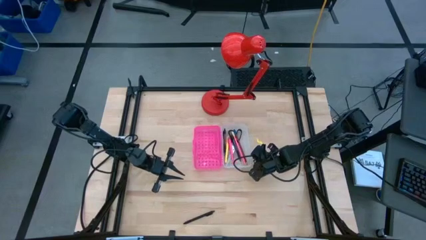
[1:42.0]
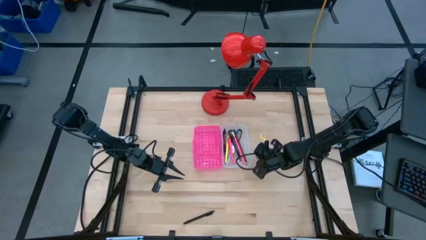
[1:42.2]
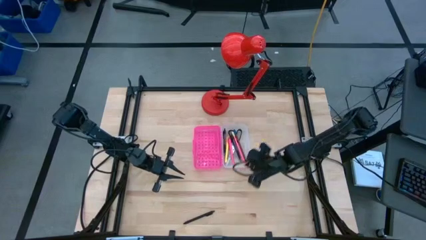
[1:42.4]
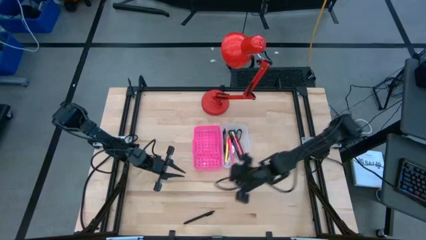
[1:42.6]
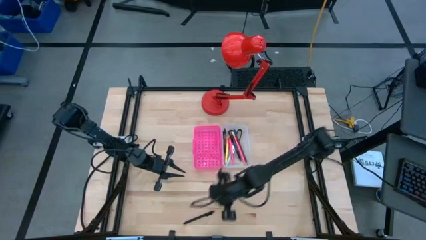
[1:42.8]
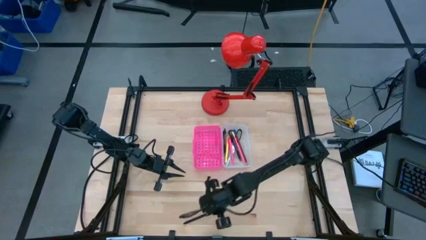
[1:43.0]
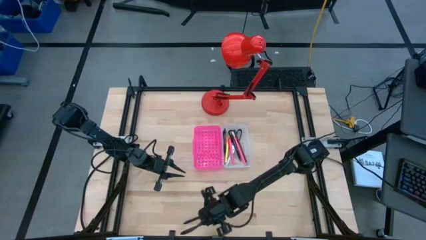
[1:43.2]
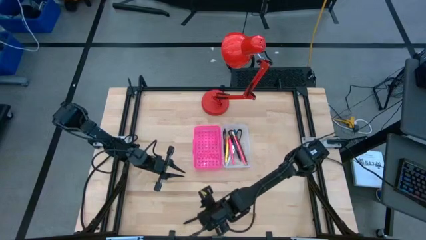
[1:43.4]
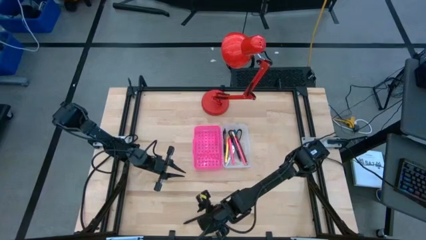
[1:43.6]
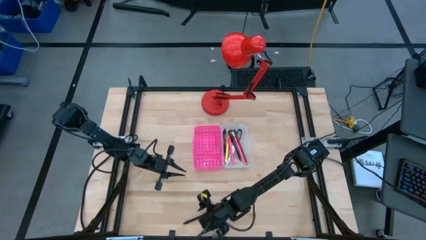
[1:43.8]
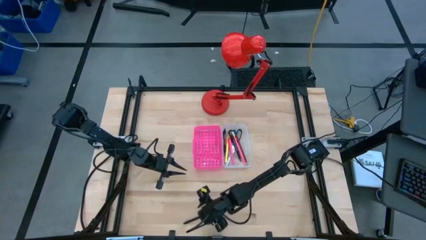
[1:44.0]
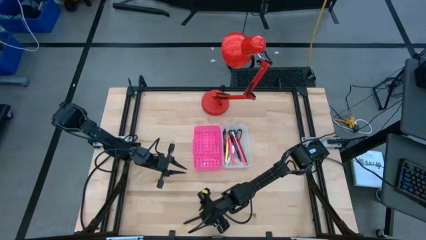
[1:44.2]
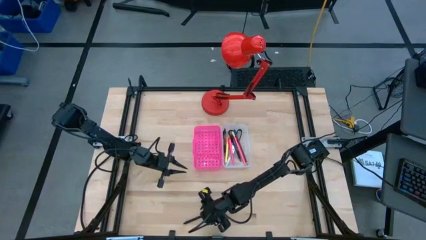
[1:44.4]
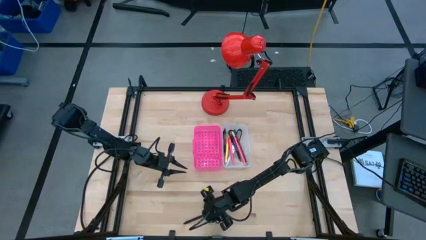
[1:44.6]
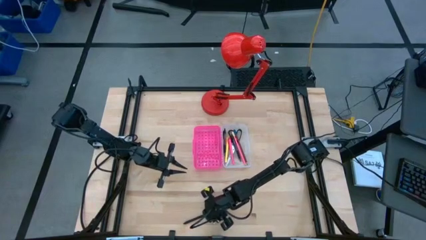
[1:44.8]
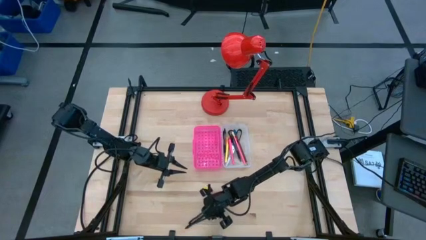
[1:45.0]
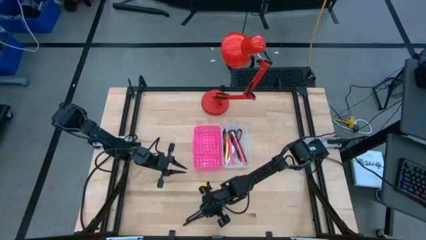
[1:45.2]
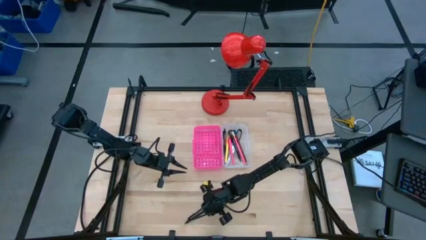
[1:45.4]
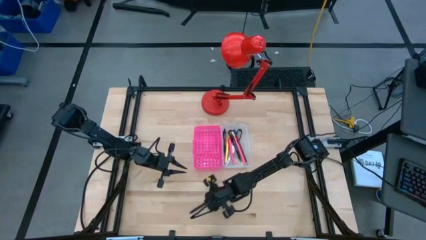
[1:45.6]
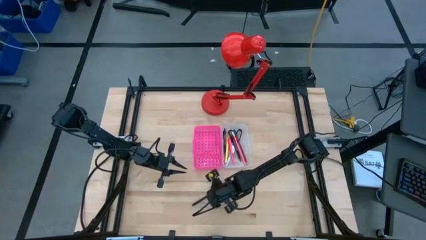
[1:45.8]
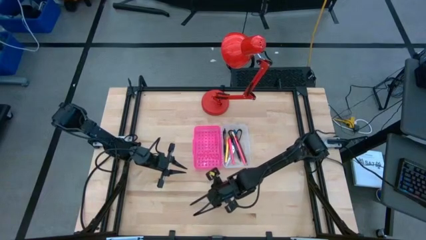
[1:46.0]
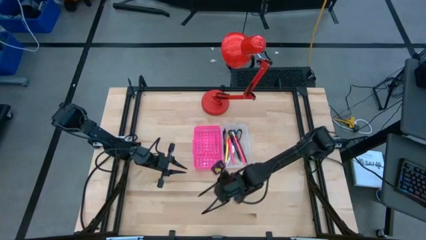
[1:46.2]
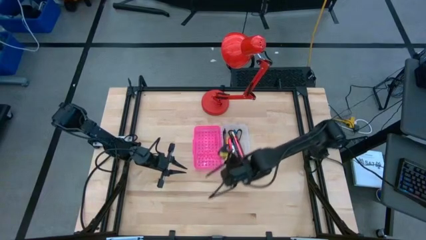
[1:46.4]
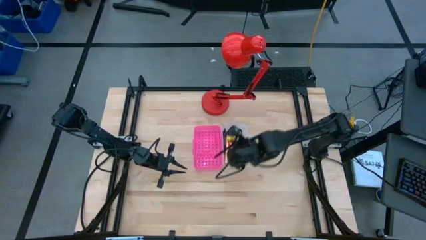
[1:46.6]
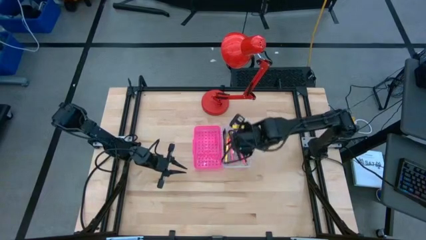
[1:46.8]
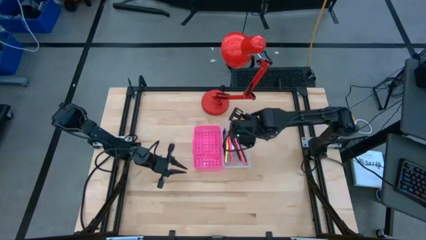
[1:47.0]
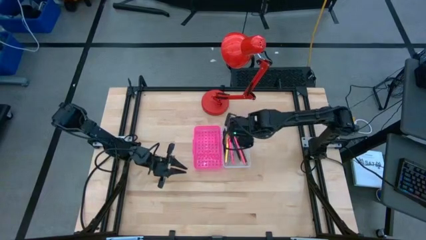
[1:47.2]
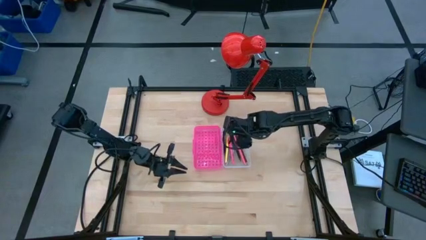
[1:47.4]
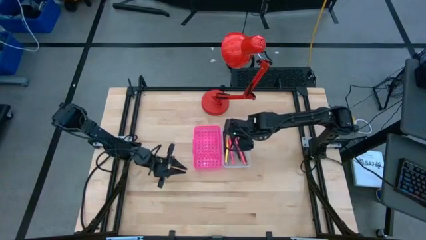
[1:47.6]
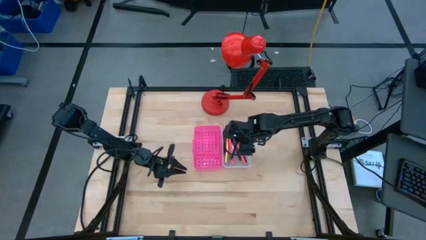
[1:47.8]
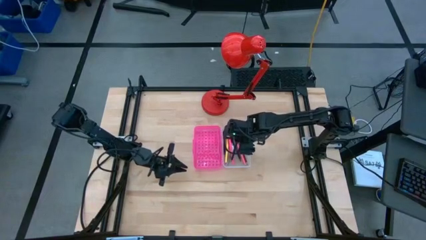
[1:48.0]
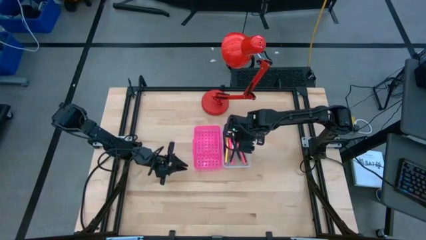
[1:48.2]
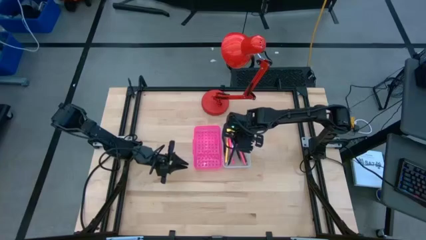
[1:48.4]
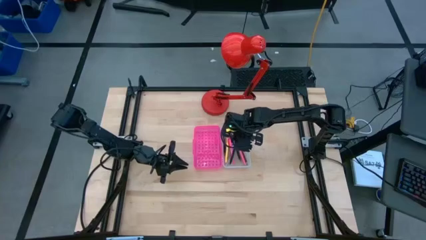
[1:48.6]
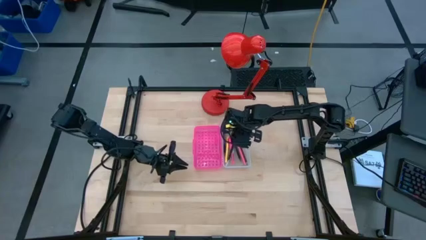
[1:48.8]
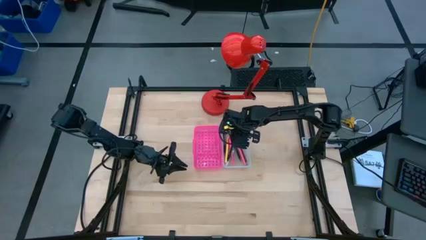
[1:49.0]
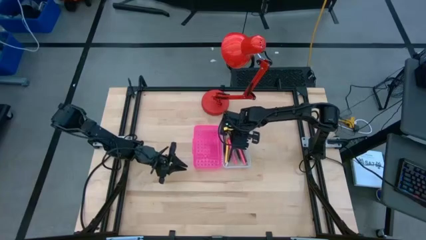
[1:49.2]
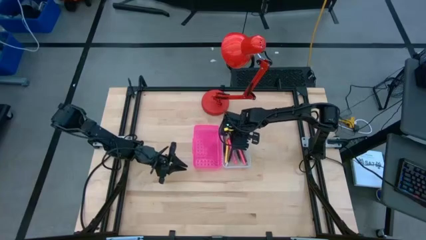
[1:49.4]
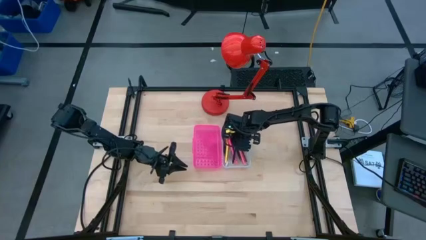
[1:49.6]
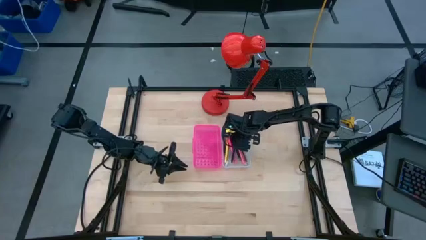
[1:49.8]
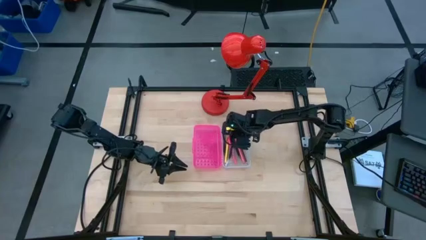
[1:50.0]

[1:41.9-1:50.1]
Task: Pick & place school supplies into a supply box
Put the black pen into the pink supply box

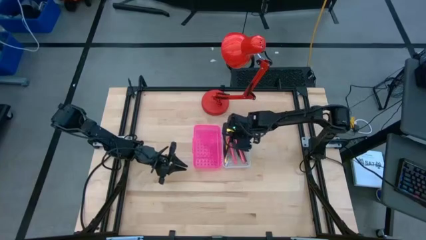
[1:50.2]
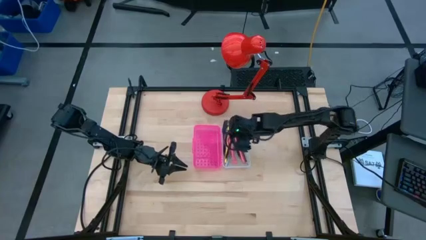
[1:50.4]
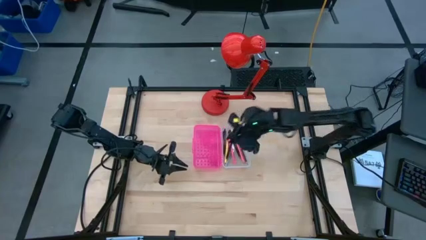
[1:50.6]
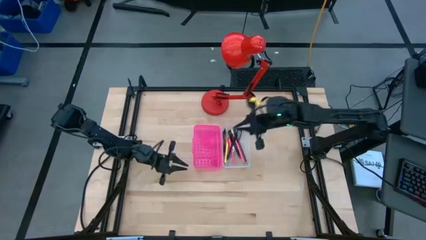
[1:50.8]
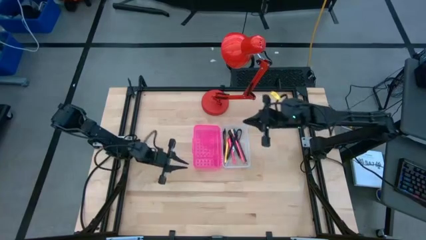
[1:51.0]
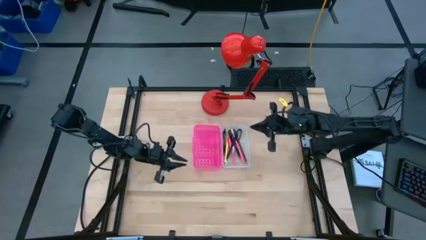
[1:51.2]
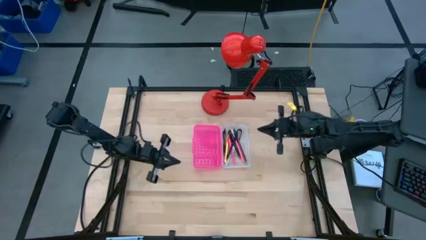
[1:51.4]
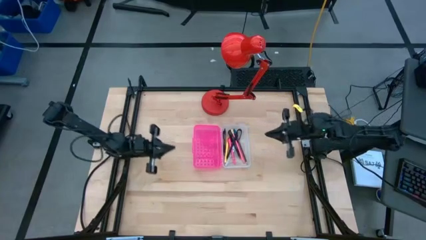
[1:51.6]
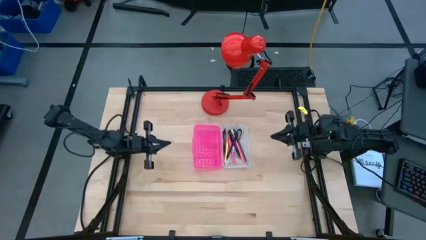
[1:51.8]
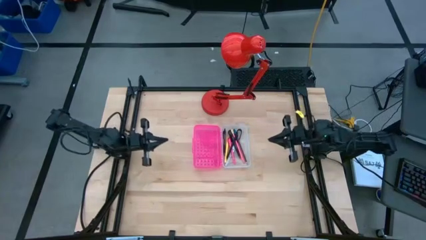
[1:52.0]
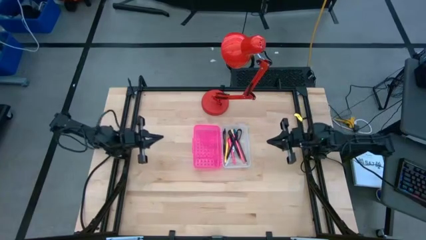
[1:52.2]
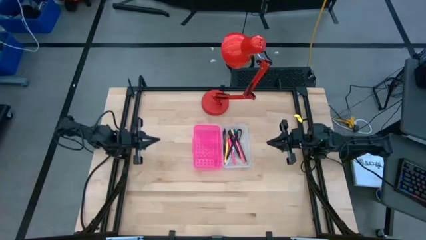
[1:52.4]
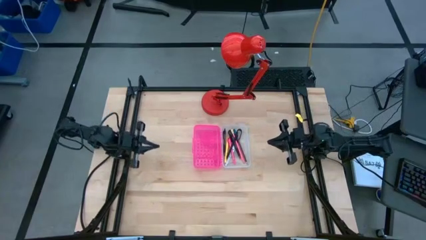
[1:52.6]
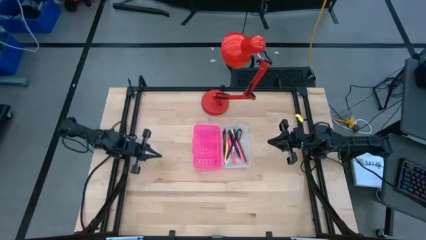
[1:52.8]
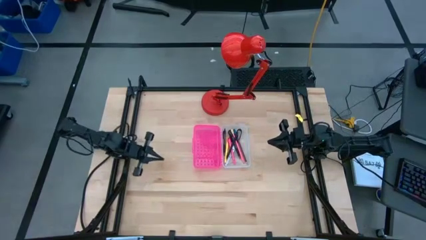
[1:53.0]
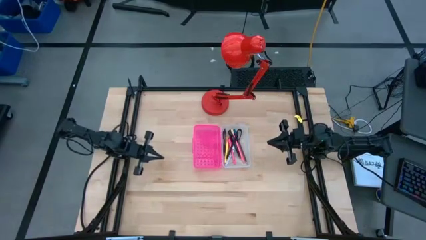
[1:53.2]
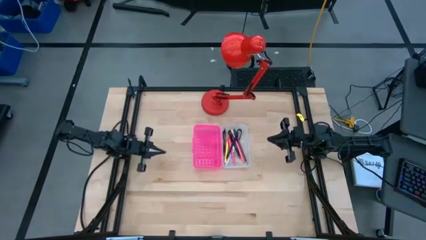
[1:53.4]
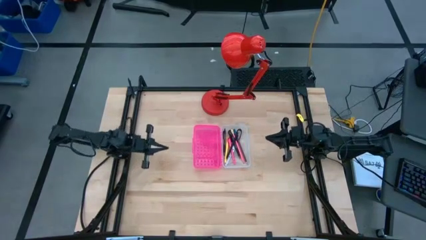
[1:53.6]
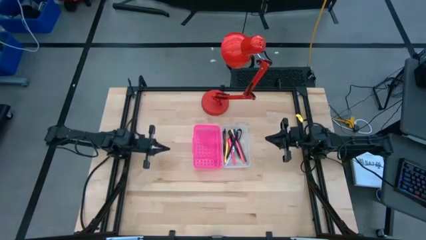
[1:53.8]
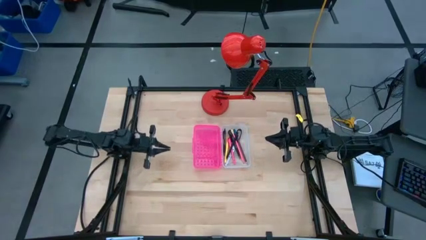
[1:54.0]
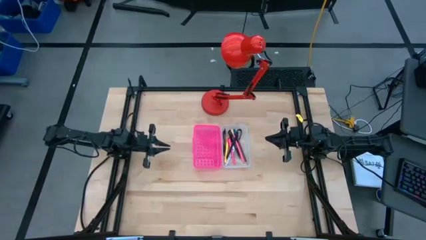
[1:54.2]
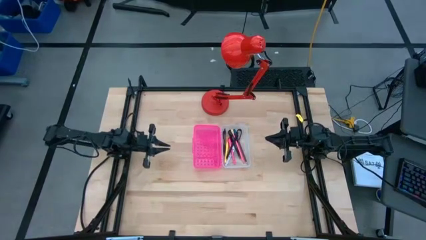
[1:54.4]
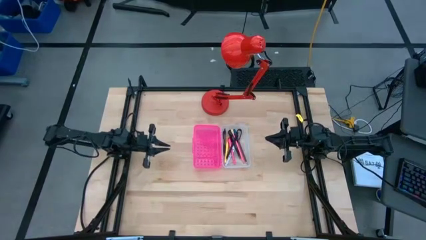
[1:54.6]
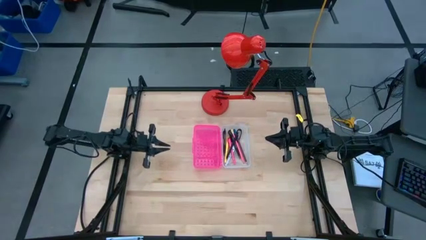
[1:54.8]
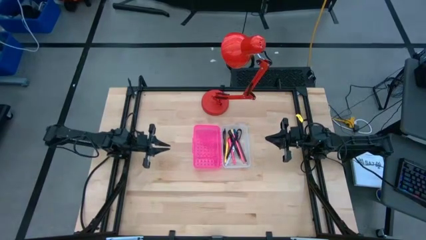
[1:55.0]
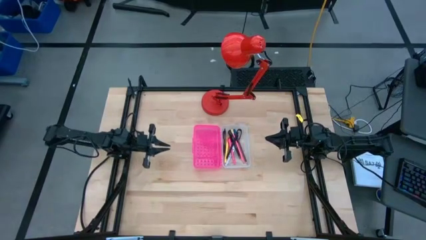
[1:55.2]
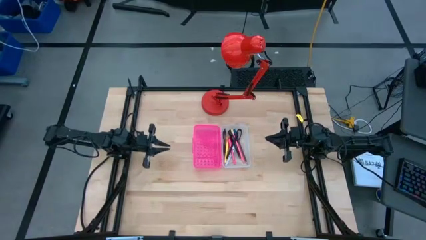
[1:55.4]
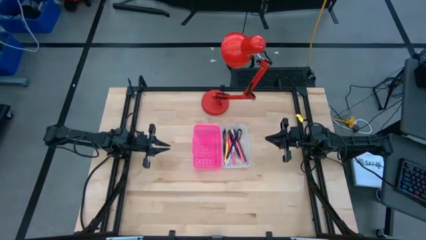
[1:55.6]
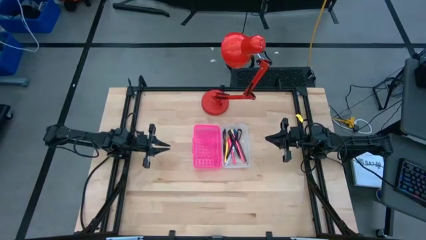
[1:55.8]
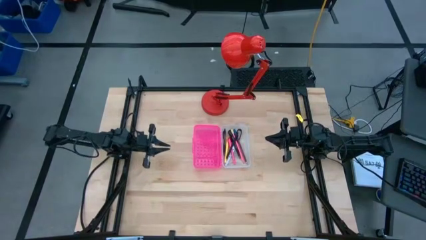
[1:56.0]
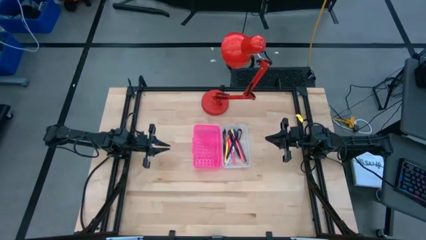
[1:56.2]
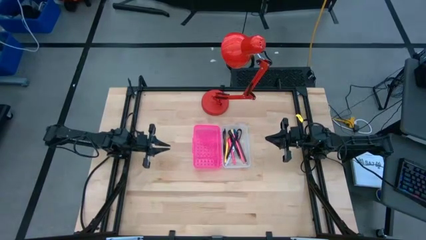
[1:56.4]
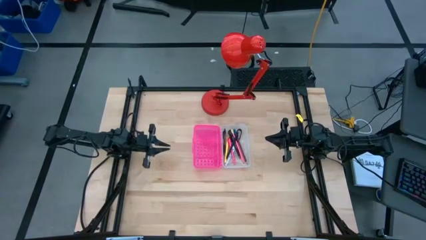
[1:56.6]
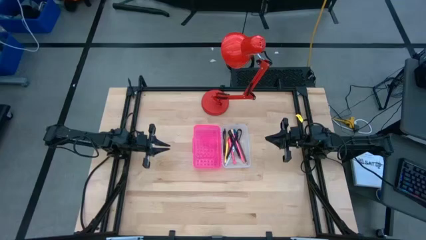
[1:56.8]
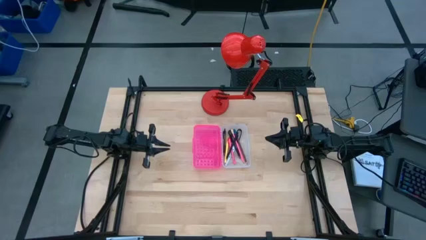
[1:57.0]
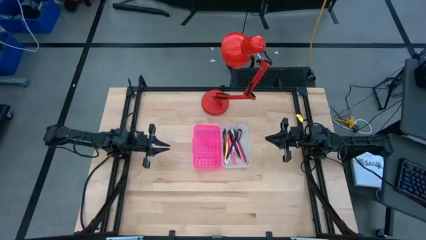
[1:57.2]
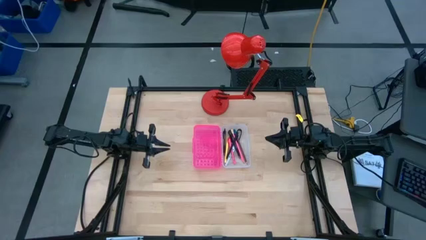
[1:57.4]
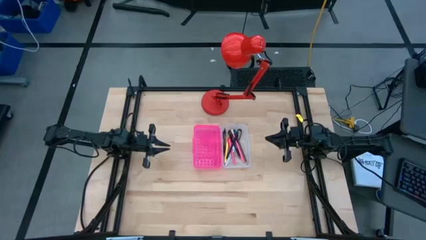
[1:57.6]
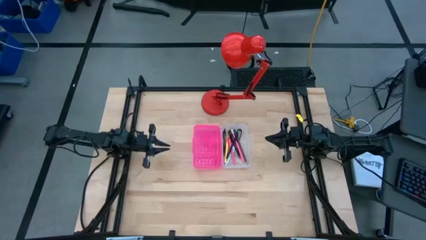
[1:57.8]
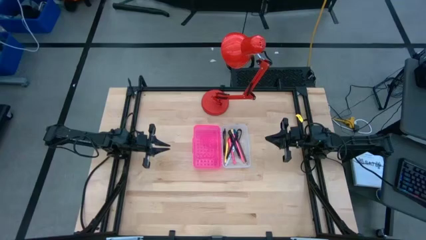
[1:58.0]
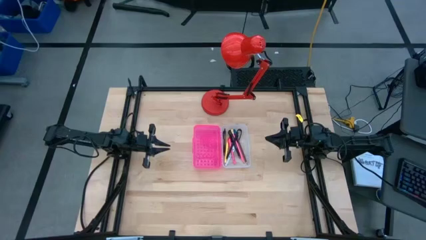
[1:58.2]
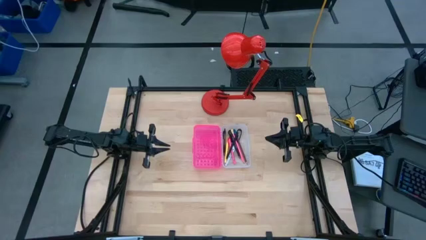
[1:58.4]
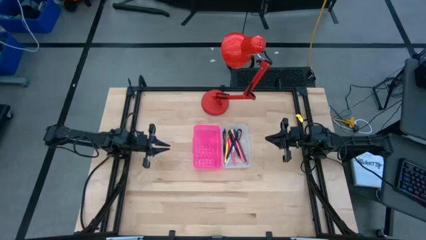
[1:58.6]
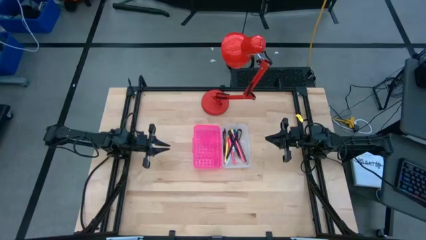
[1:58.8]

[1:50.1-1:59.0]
Return to Home Position
